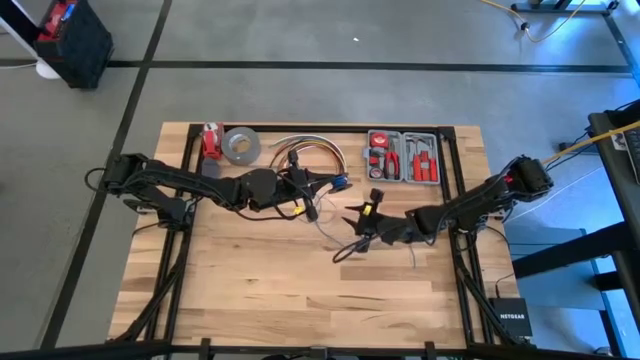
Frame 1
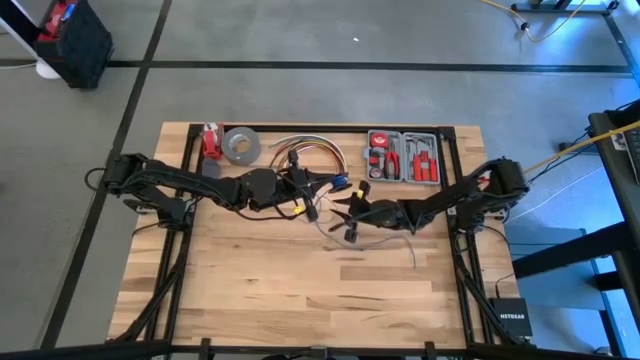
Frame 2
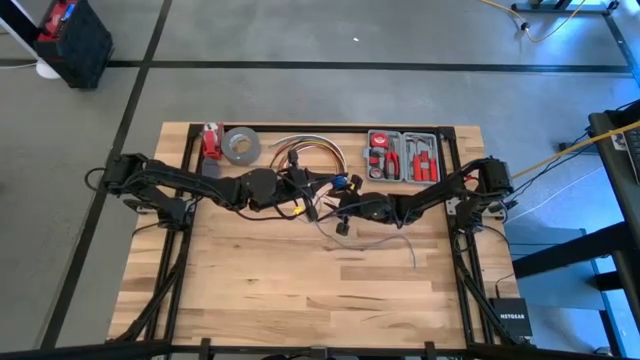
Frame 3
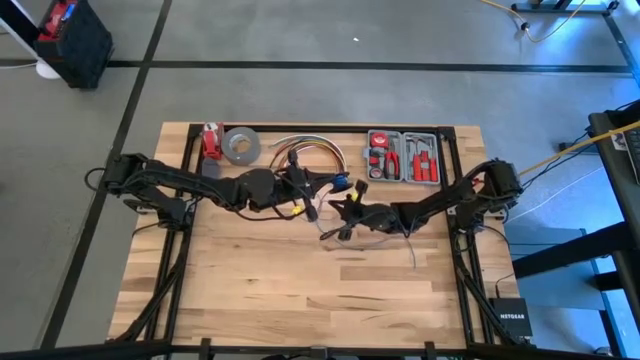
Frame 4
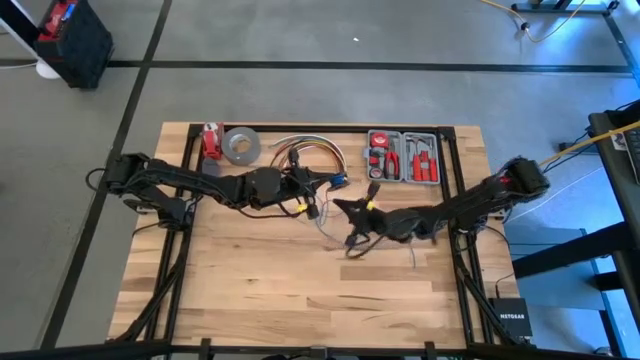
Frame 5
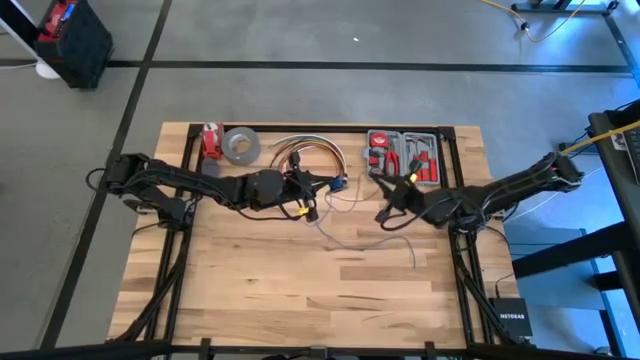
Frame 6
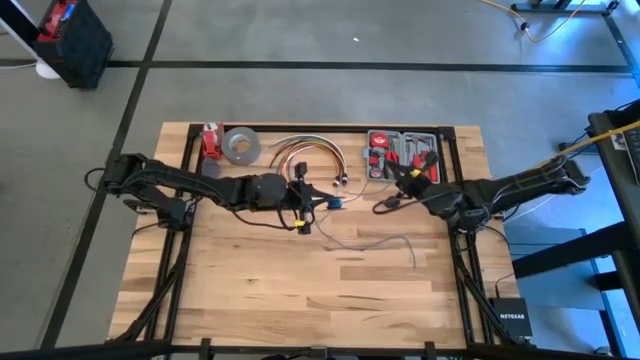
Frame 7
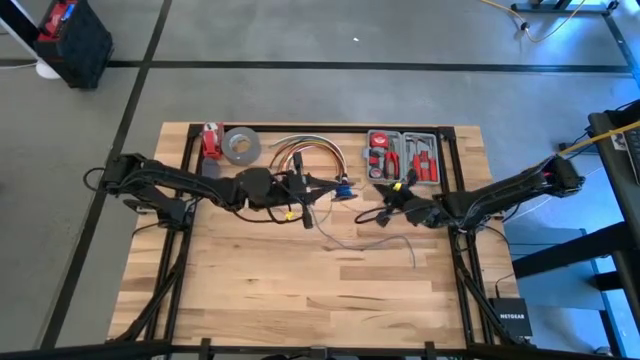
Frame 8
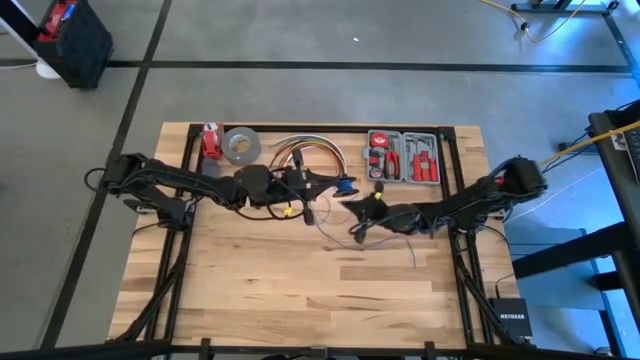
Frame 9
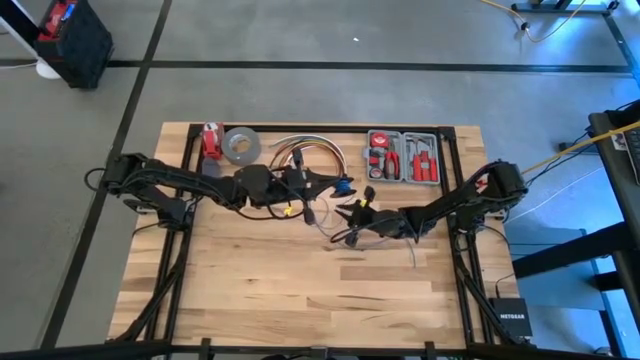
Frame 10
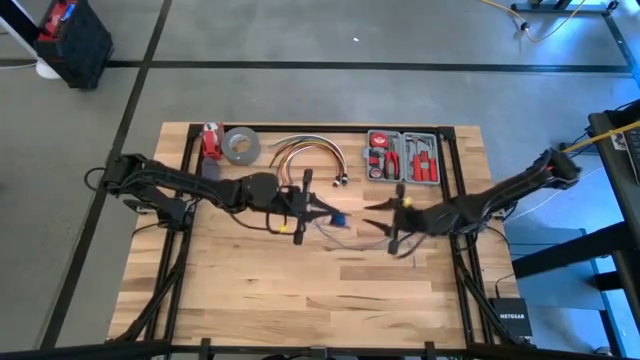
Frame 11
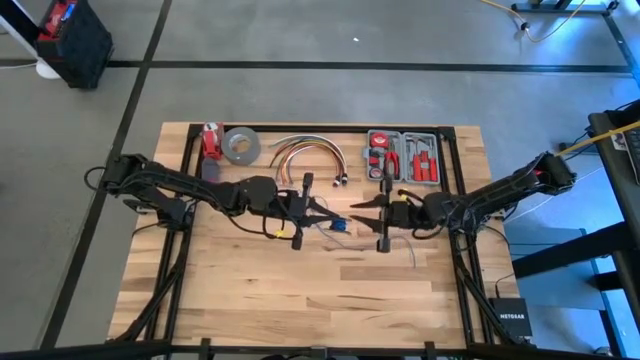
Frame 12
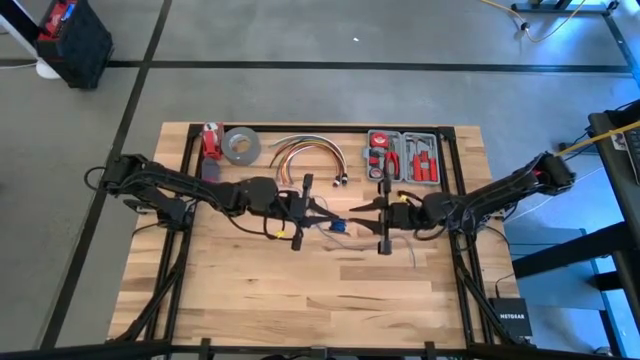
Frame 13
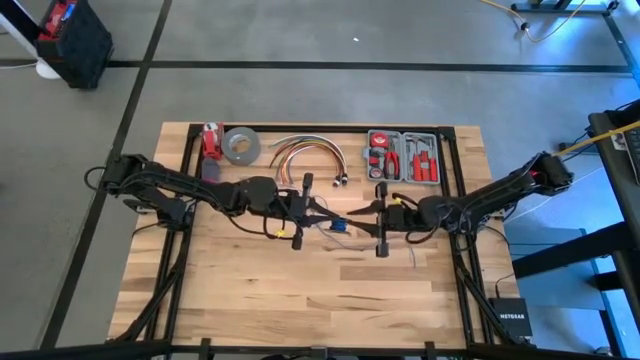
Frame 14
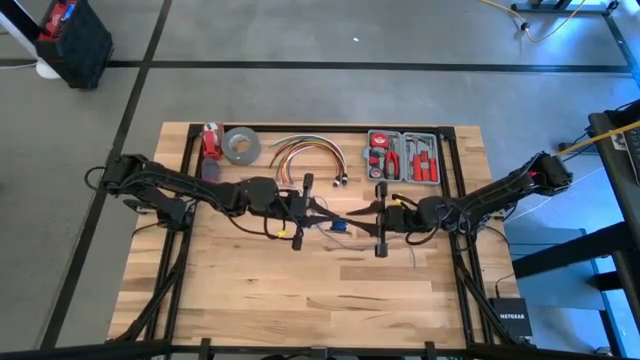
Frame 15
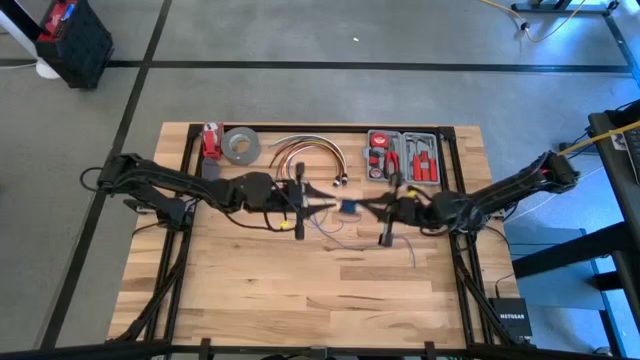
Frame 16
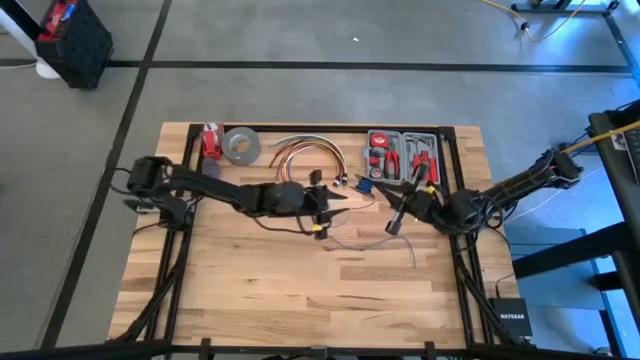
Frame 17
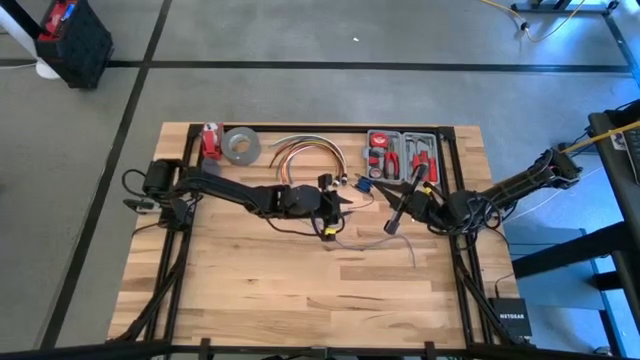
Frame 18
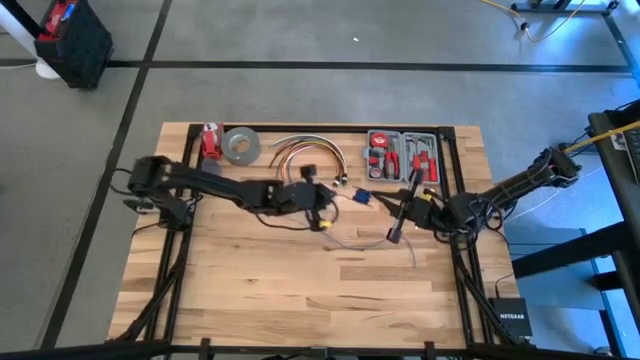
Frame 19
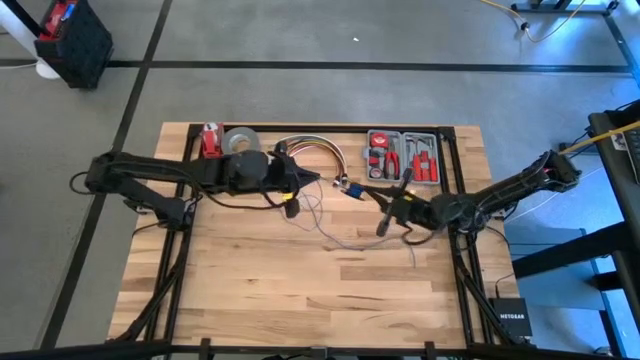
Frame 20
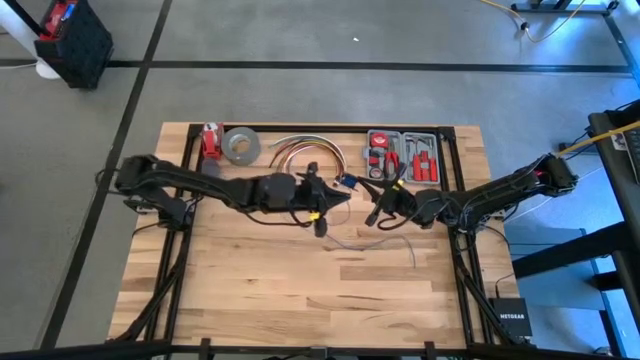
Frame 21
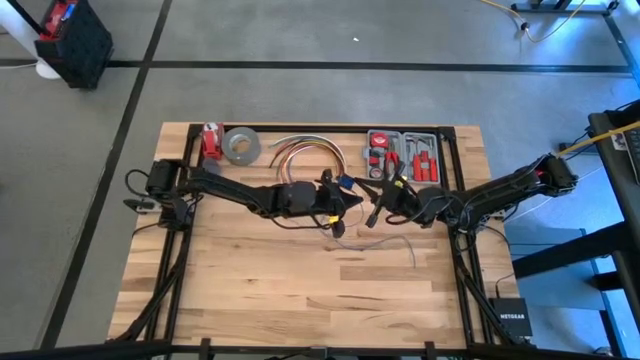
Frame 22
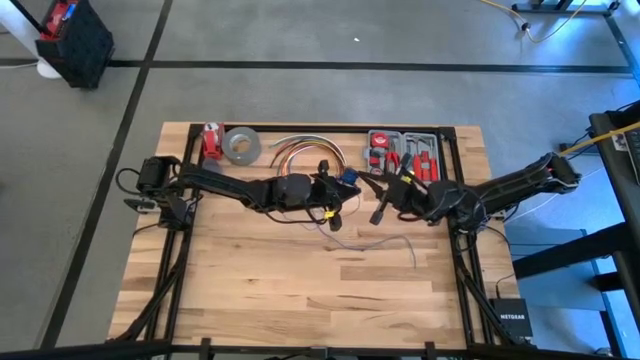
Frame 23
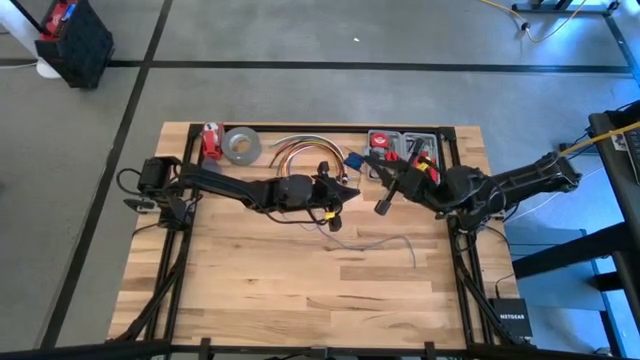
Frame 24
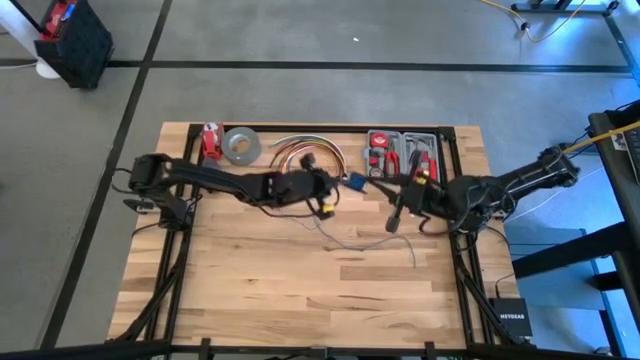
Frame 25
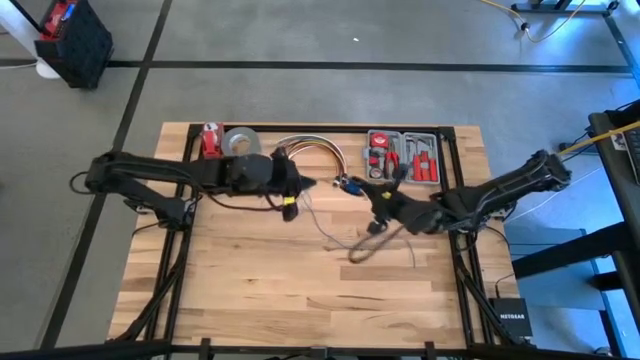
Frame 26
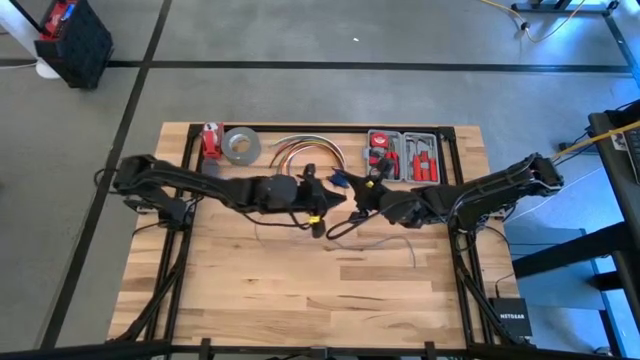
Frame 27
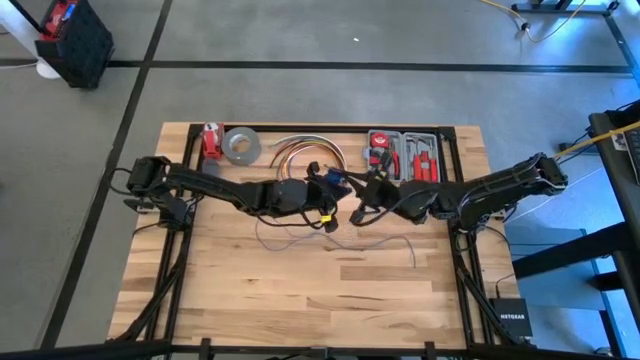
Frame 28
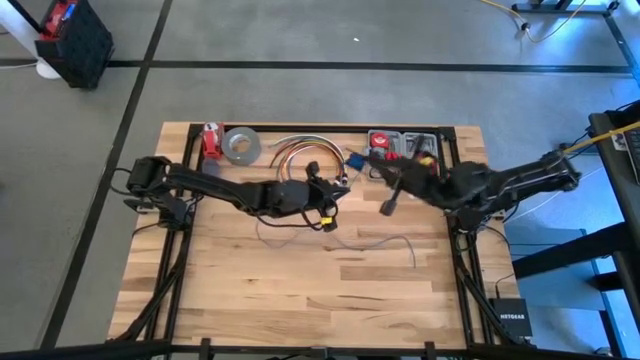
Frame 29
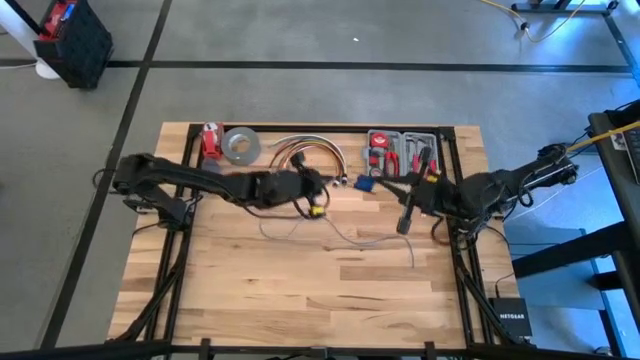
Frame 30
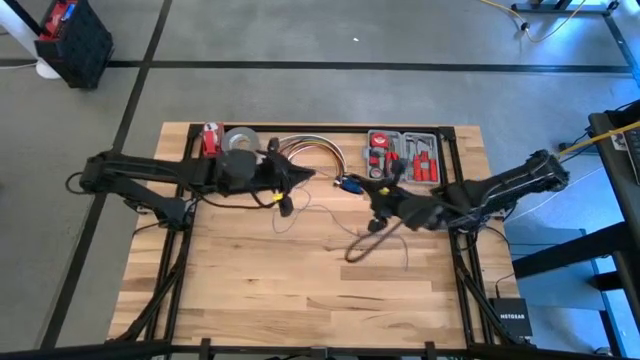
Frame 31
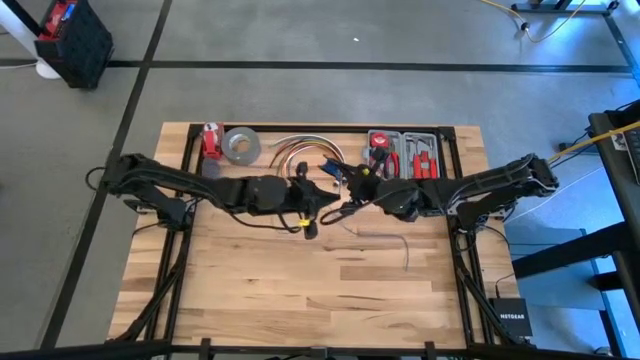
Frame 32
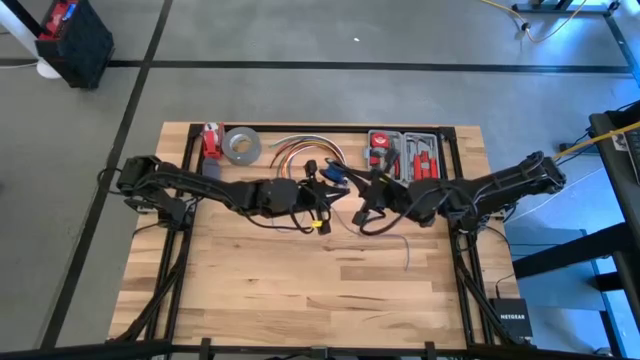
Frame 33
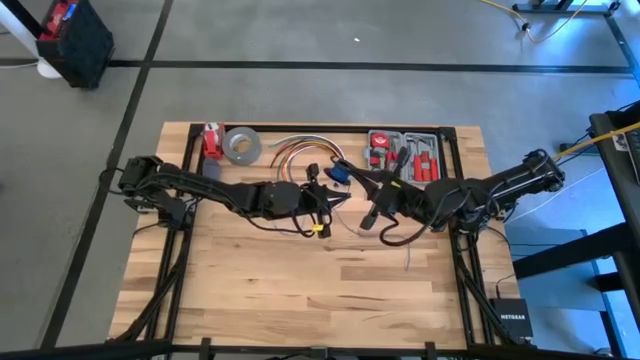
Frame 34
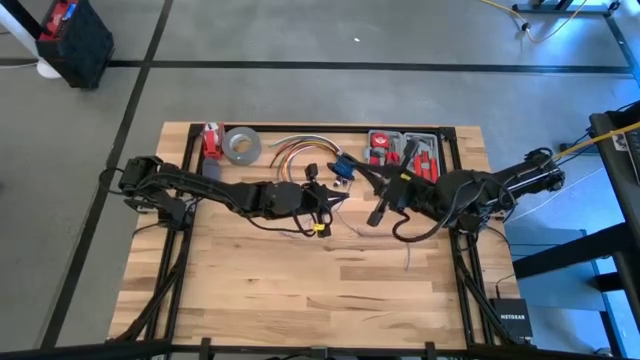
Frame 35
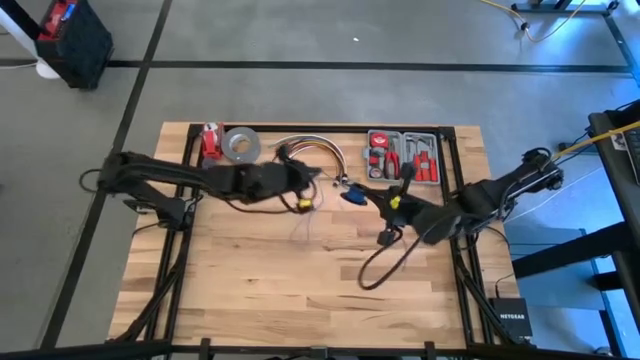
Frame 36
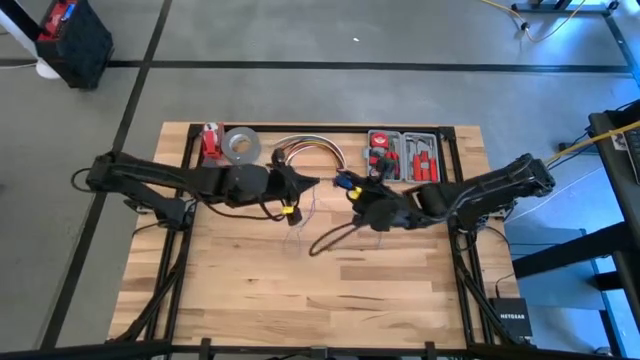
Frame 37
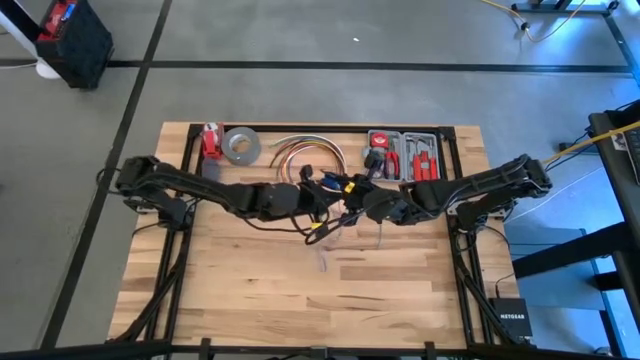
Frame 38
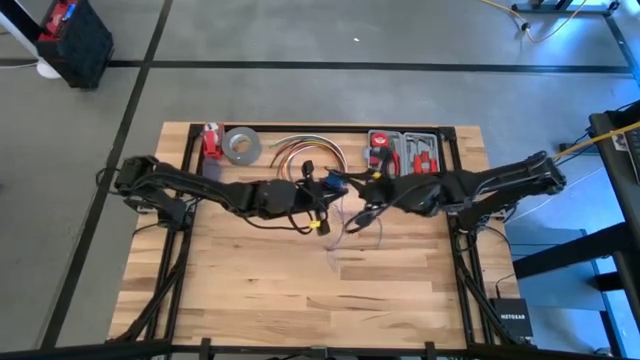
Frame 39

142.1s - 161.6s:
Task: Coil cords
Coil the blue wire on the black spool

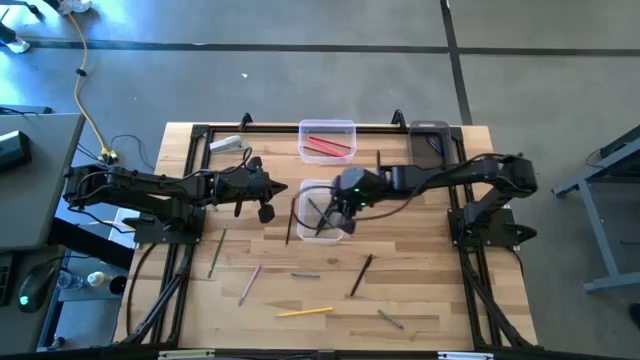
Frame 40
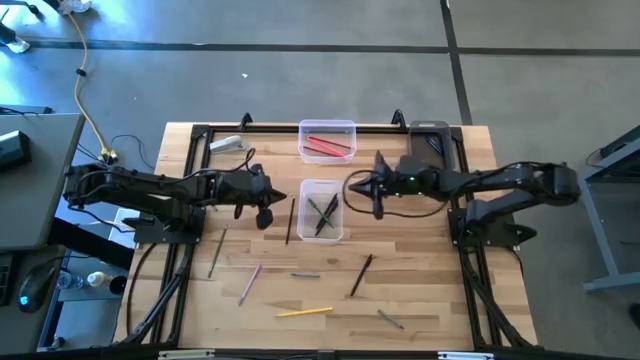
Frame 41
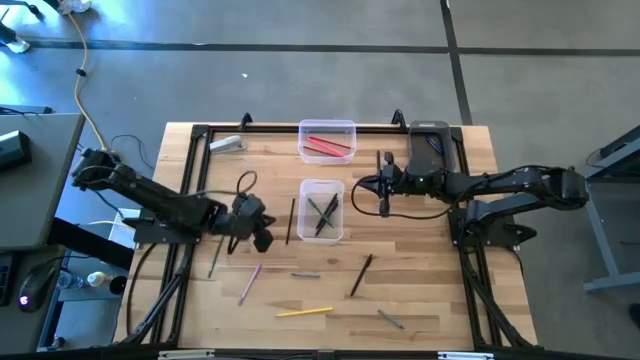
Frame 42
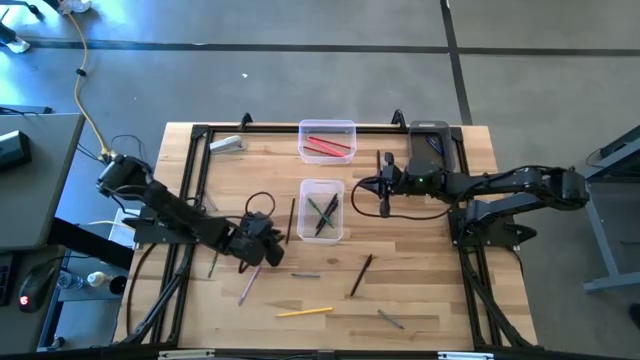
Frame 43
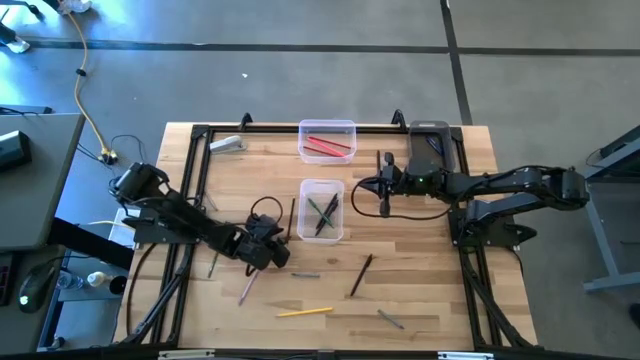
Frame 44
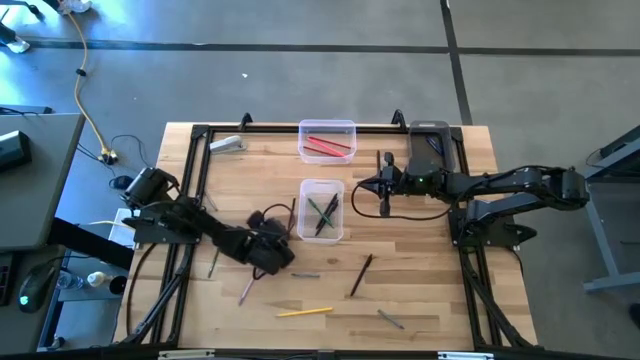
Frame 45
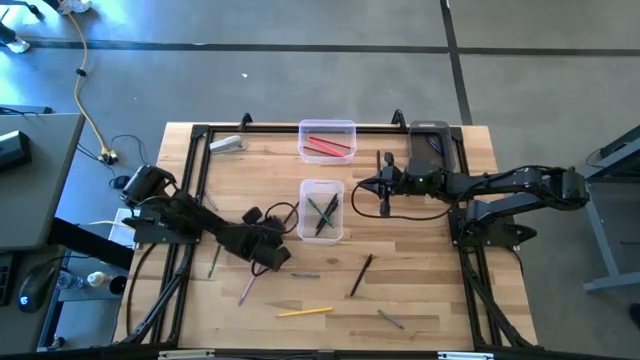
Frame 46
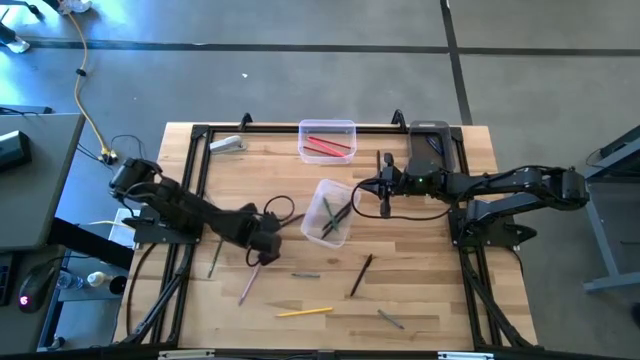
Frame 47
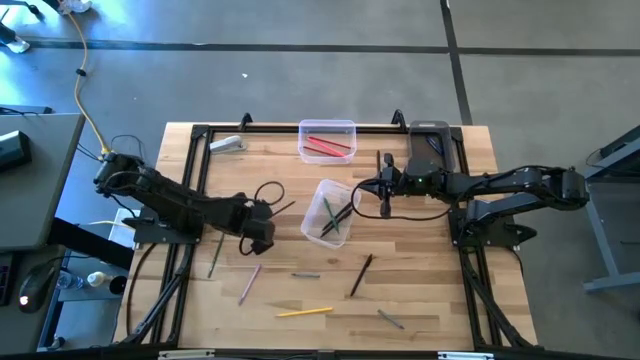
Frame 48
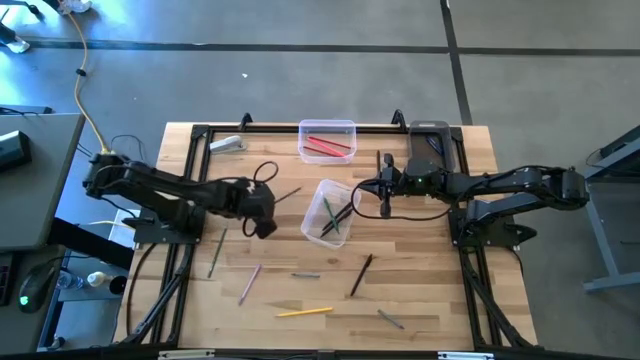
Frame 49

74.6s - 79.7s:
Task: Sort crayons/erasers/pens/pencils in bins
Put the blue color pencil into the top transparent bin
